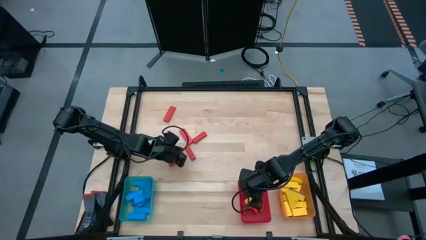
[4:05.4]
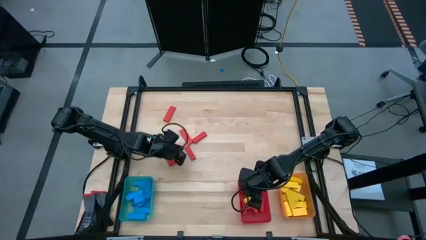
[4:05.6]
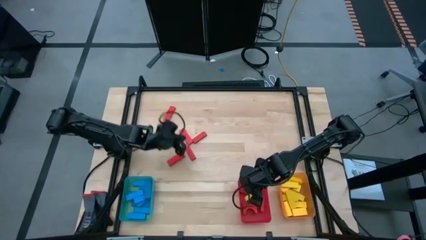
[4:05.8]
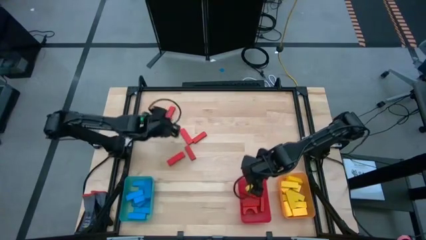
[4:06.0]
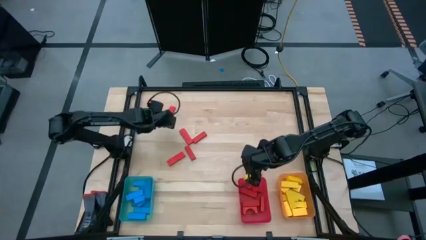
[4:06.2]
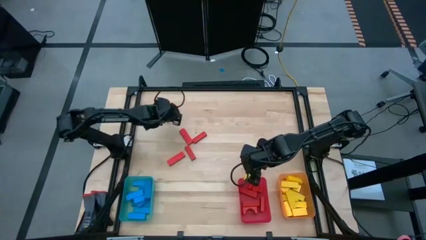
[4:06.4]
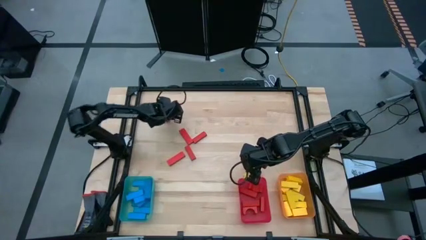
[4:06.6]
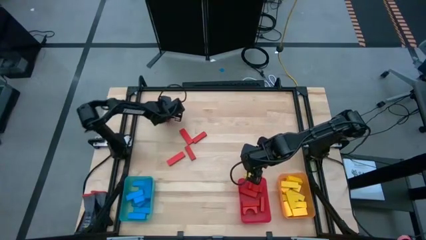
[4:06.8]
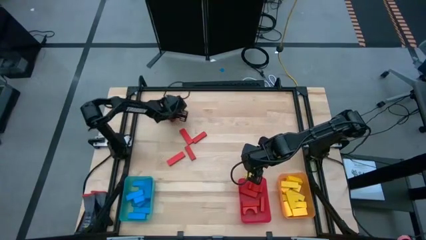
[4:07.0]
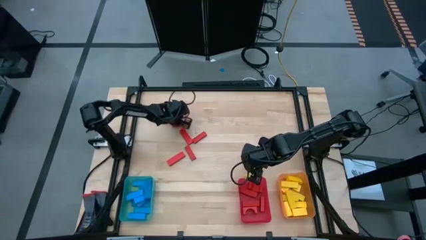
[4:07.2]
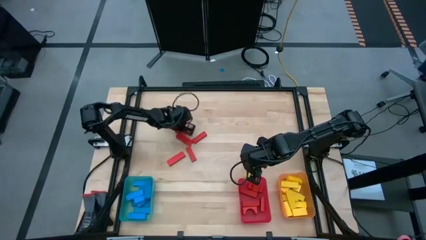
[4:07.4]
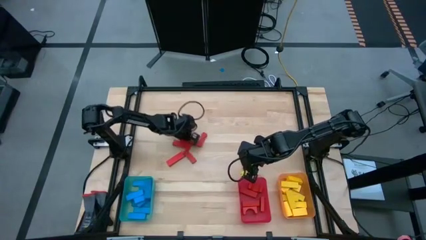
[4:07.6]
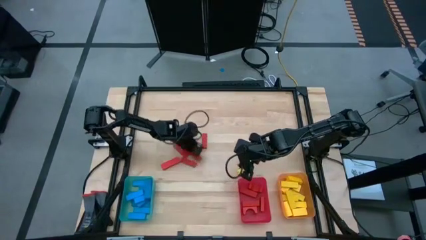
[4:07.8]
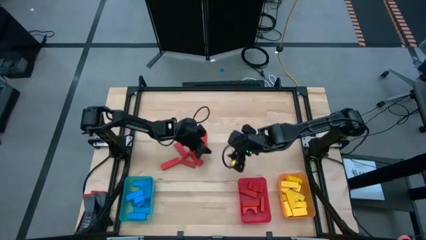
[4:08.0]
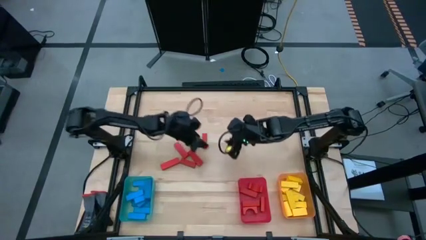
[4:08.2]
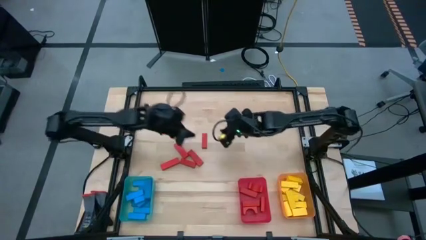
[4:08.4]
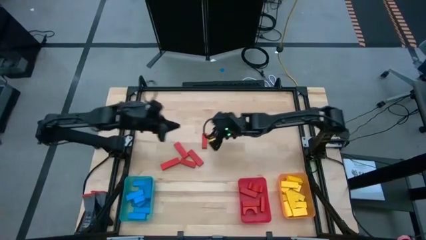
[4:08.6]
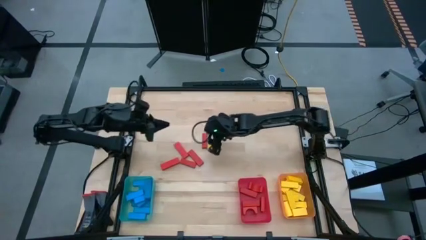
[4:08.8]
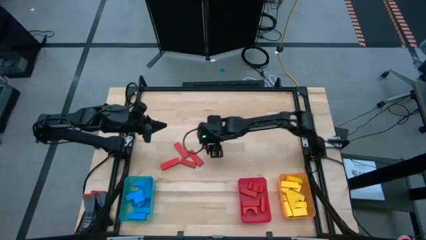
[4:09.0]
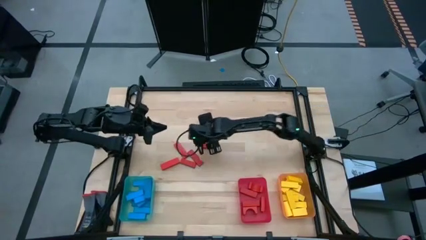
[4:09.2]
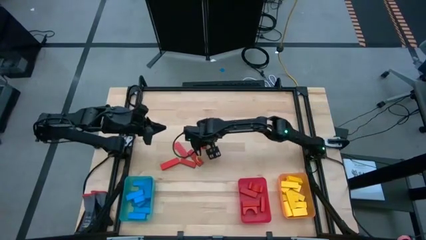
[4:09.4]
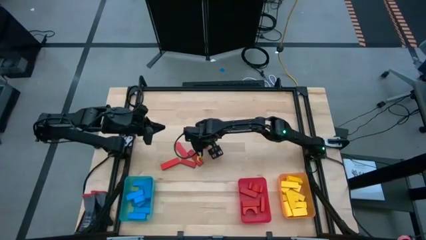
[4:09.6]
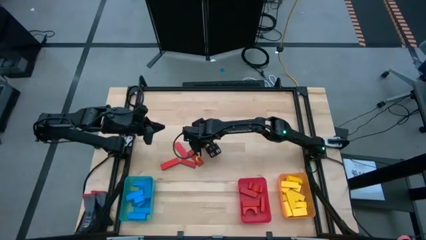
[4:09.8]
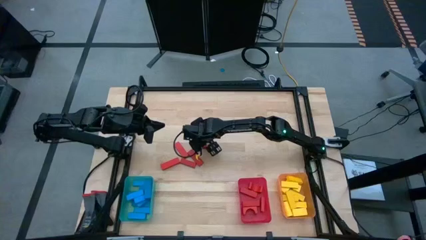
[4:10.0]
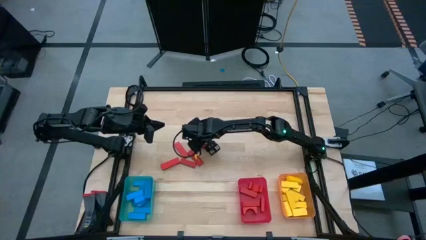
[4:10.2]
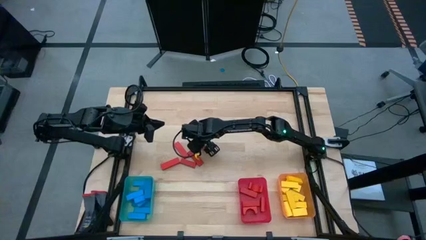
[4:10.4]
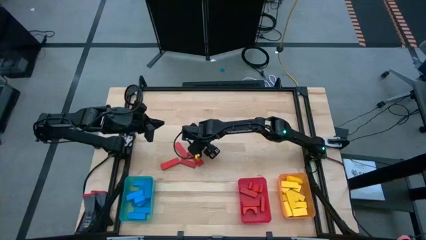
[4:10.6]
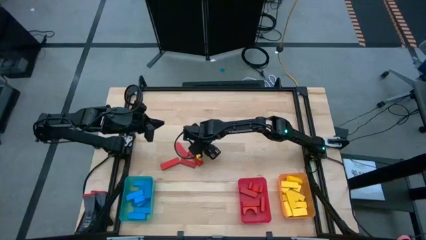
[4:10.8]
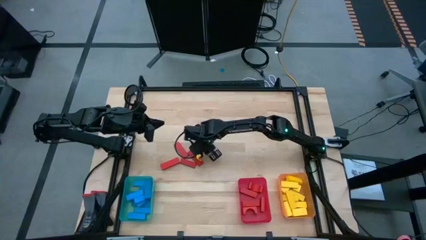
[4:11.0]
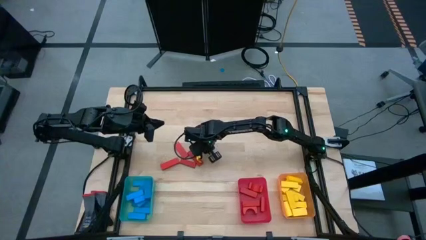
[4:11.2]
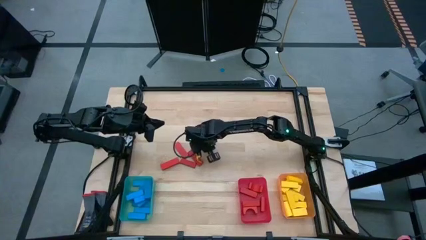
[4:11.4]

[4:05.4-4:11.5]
Task: Sort blocks
Put the red block into the red bin

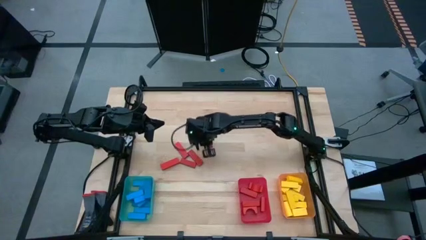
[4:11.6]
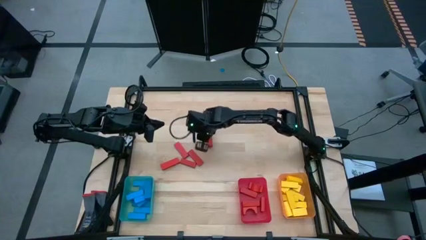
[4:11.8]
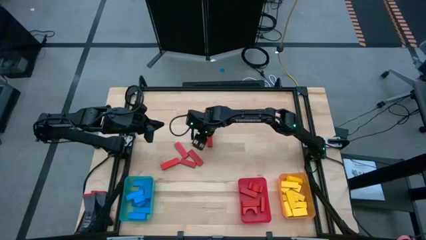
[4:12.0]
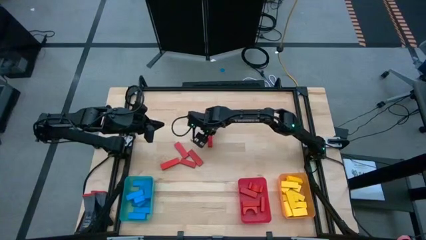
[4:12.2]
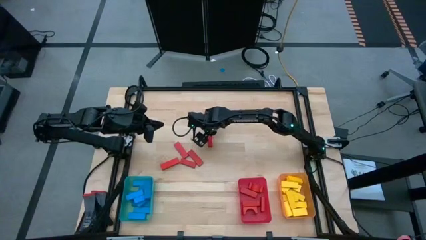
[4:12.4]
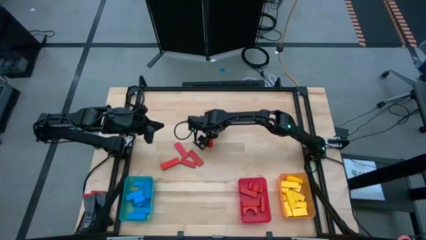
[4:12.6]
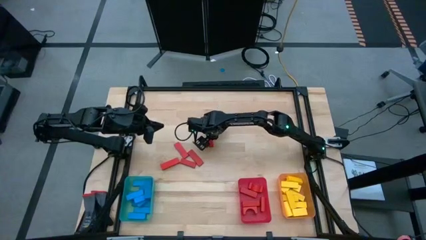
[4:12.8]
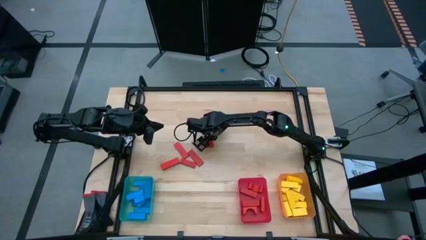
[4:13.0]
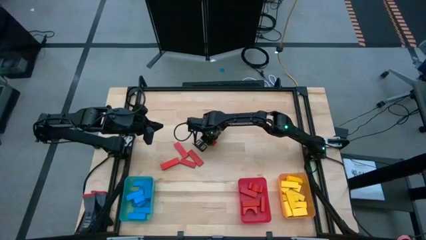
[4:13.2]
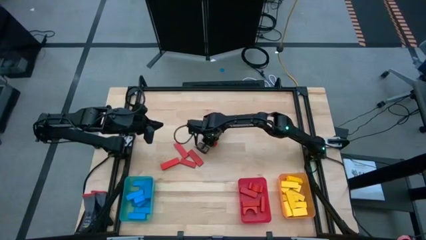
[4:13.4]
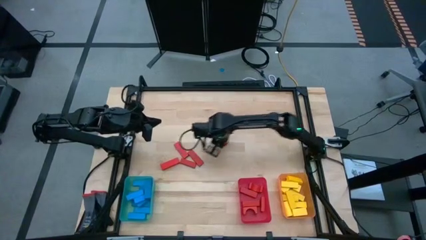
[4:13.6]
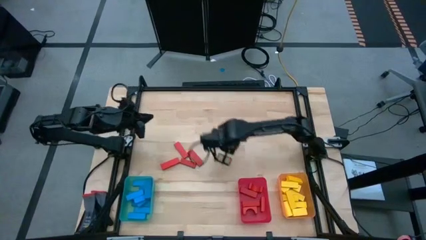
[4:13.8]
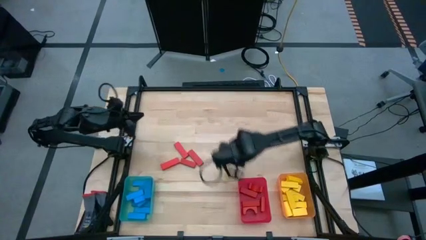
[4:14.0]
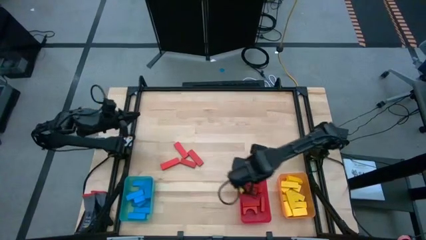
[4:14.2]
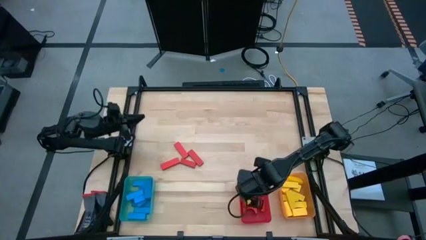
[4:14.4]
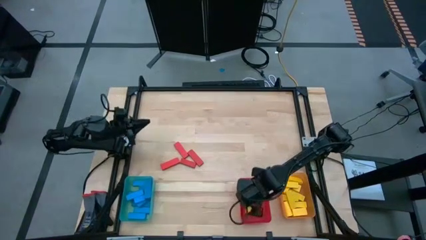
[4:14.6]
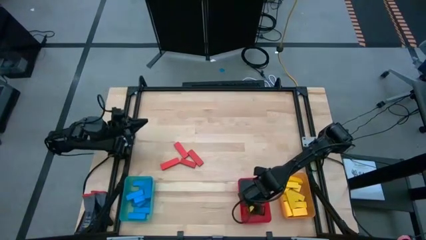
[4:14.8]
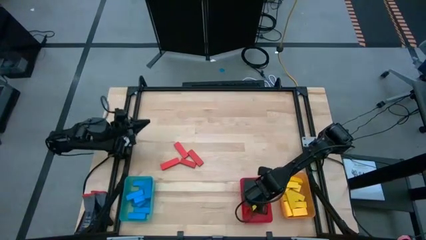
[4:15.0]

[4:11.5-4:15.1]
Put the red block into the red bin

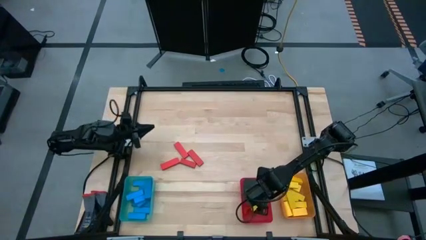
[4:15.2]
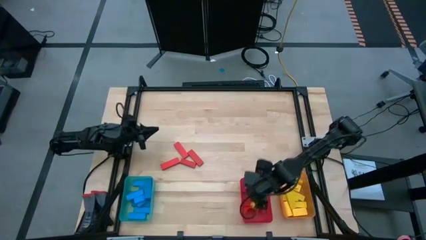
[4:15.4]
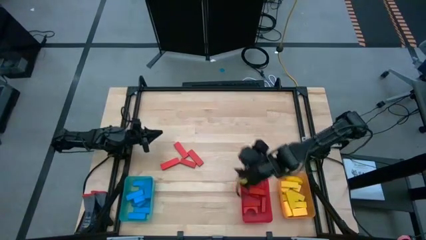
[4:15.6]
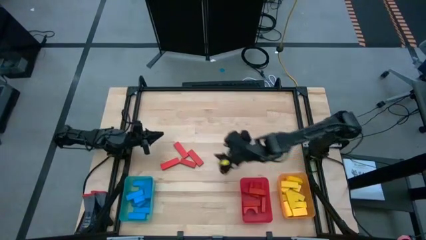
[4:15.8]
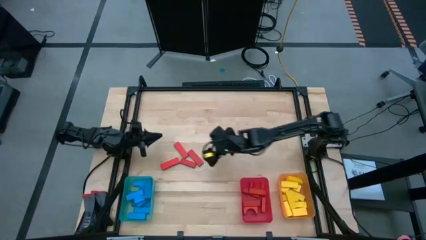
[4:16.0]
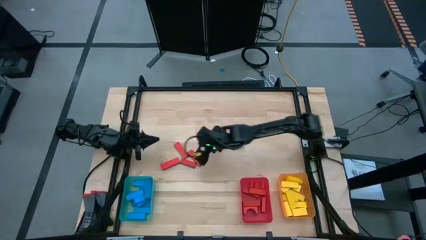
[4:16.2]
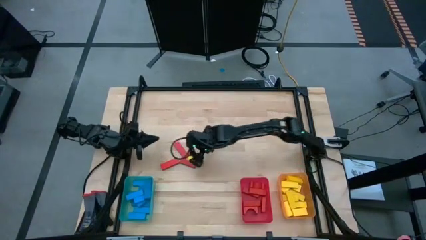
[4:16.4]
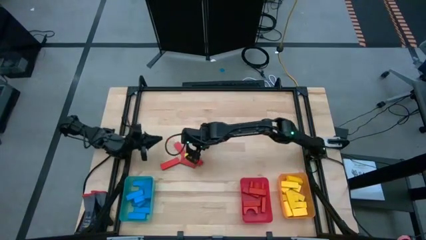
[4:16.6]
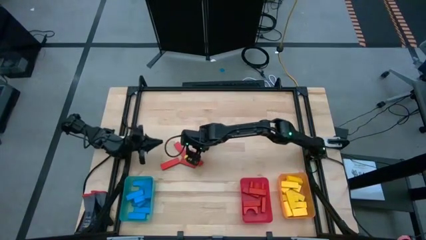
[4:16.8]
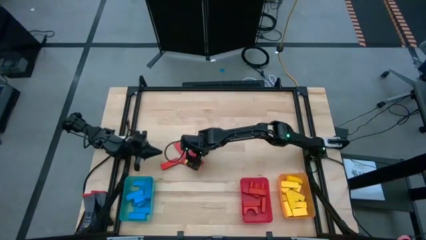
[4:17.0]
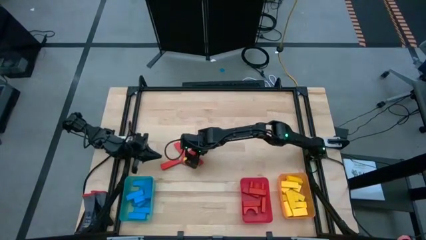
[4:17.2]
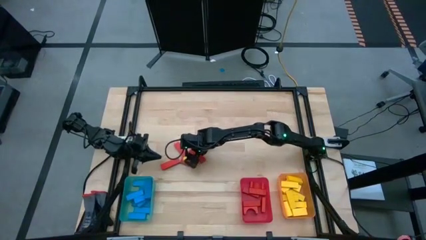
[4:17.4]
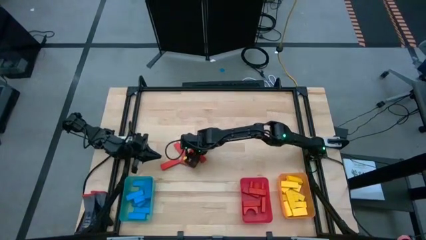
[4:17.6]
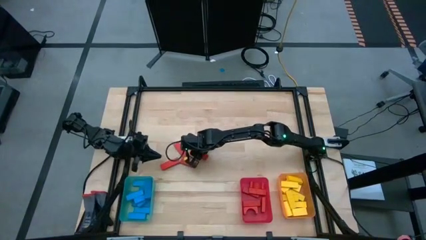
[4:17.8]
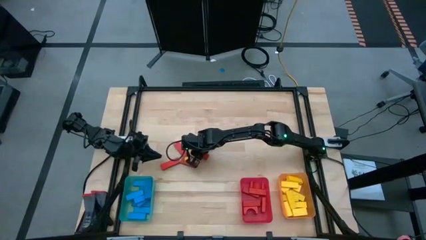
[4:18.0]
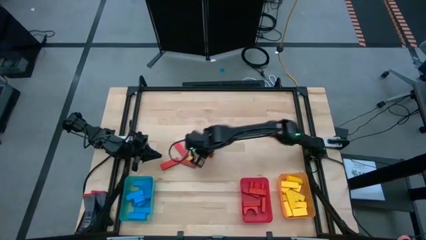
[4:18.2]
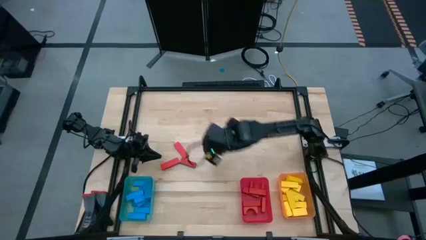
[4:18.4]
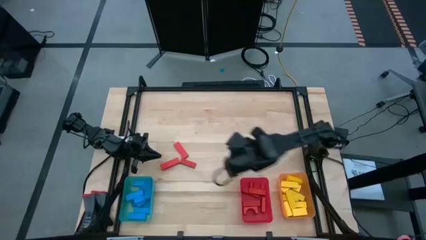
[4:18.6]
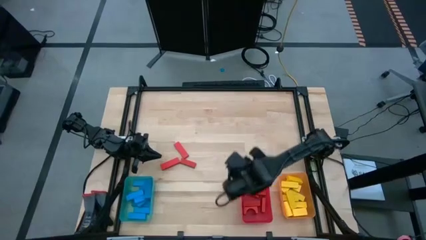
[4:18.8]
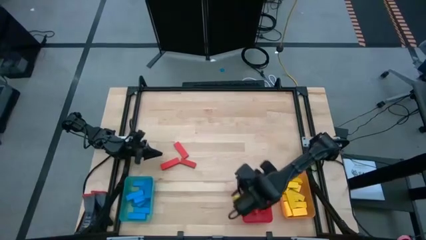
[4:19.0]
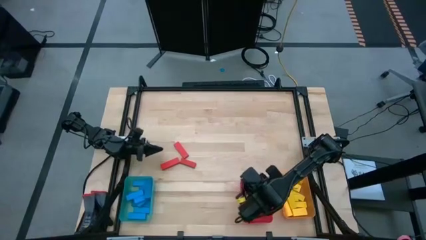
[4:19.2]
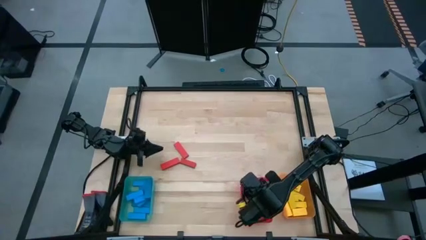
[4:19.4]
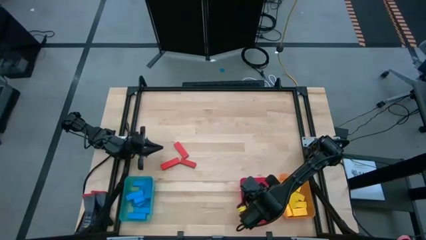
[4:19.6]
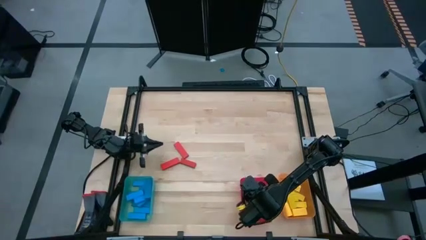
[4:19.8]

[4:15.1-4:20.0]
Put the red block into the red bin

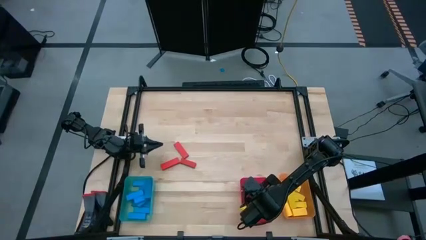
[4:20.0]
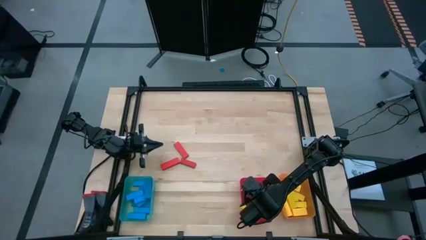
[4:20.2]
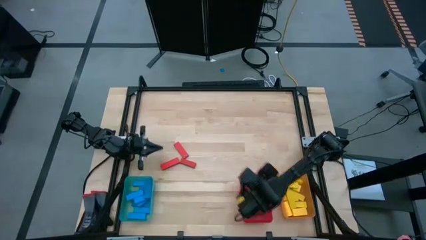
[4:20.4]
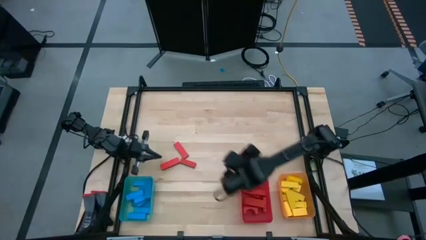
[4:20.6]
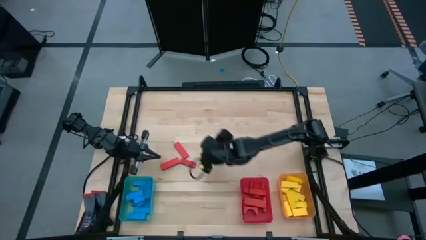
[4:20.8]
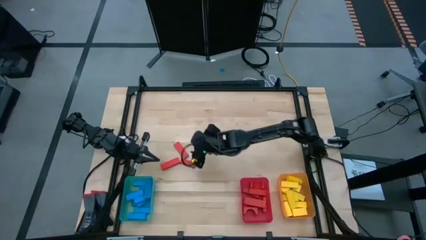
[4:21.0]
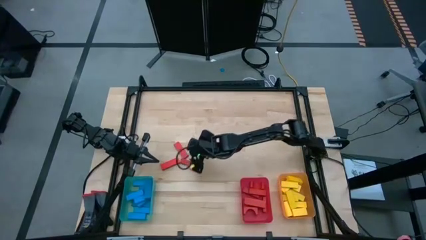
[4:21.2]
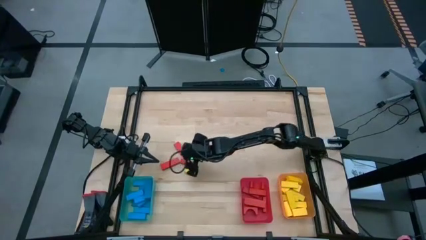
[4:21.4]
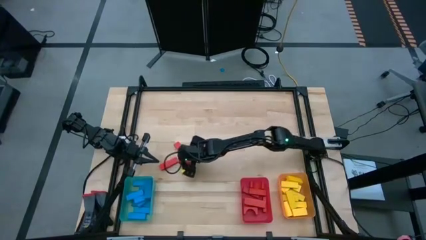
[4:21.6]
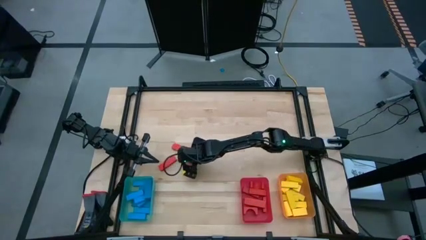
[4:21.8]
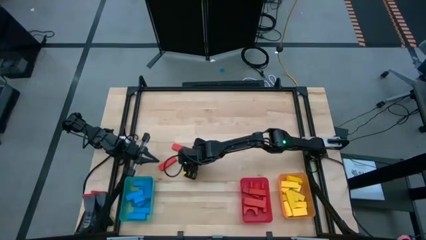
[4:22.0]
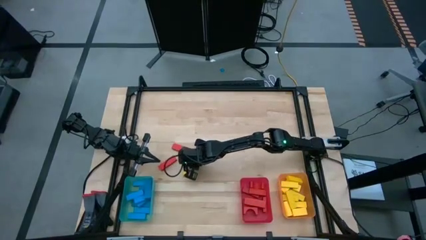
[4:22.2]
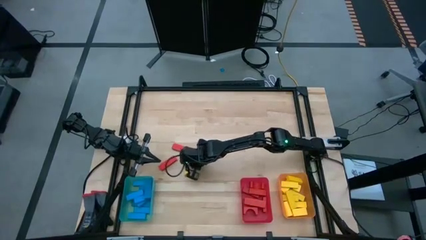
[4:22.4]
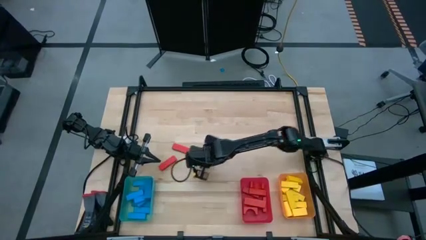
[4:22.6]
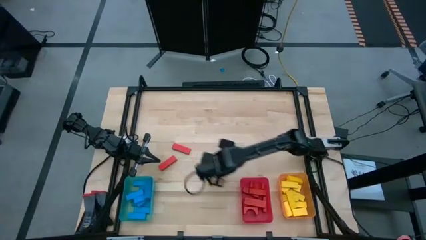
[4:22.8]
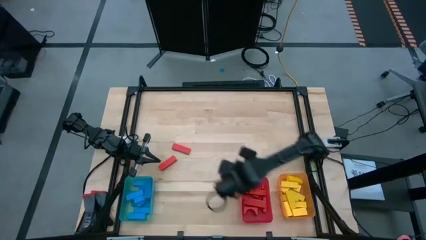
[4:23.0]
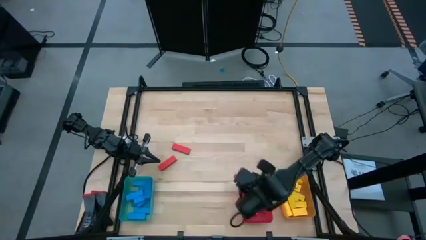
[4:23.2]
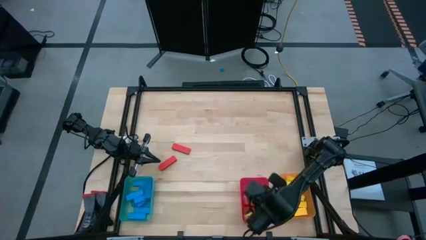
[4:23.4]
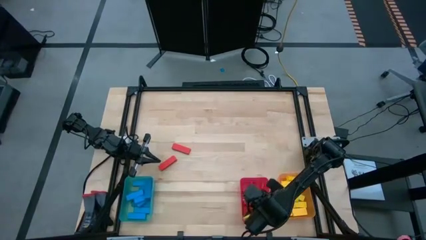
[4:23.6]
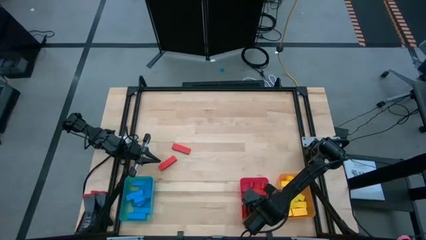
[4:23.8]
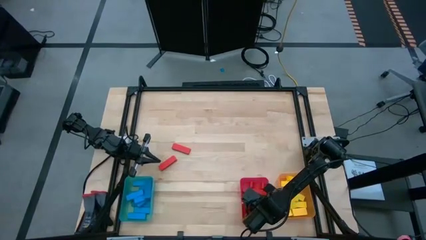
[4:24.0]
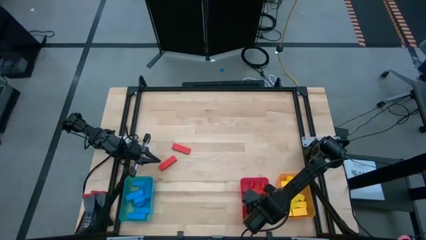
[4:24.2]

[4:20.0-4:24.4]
Put the red block into the red bin
